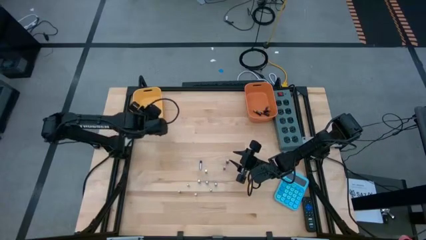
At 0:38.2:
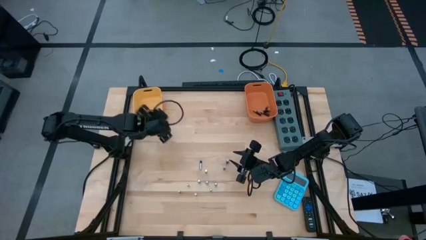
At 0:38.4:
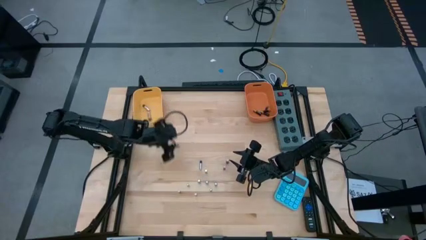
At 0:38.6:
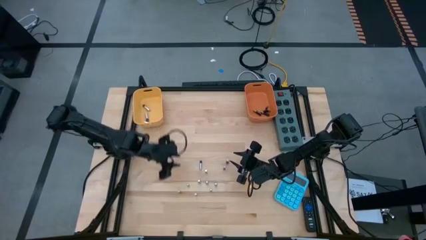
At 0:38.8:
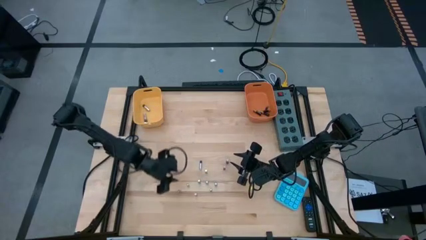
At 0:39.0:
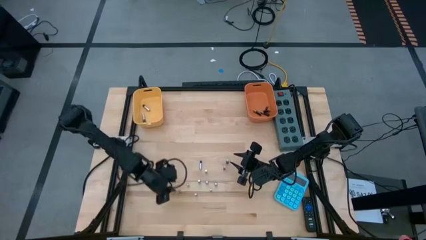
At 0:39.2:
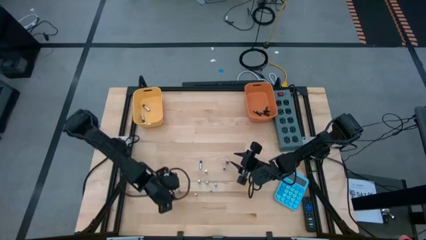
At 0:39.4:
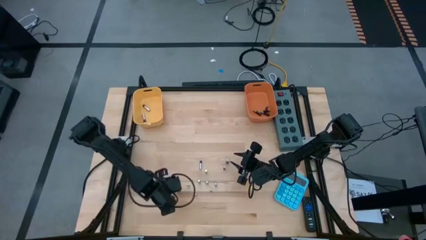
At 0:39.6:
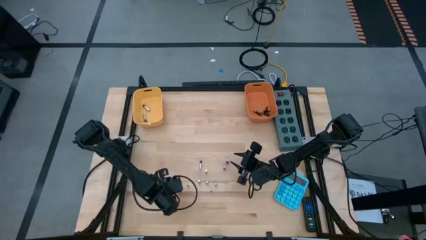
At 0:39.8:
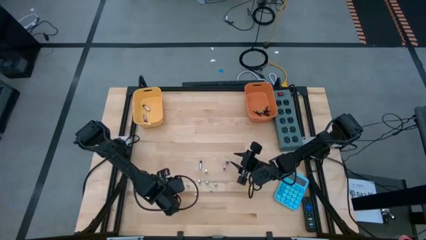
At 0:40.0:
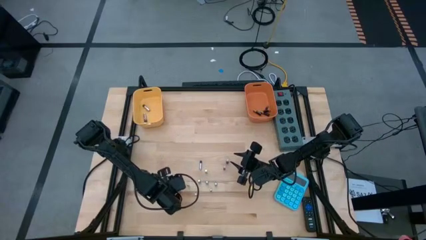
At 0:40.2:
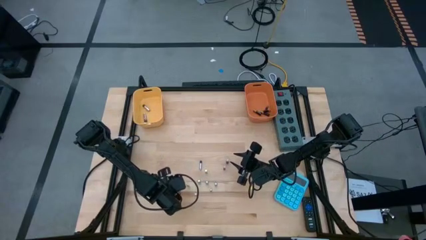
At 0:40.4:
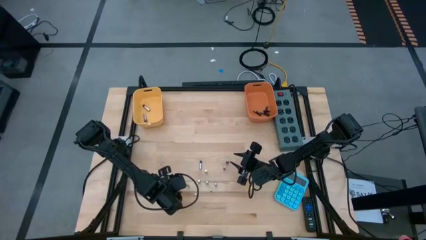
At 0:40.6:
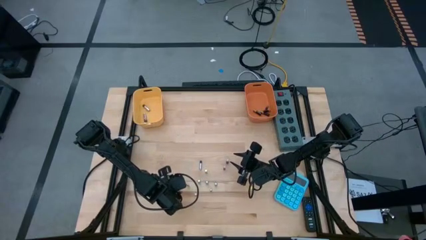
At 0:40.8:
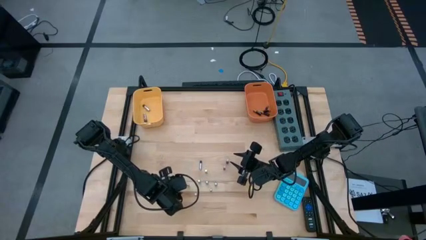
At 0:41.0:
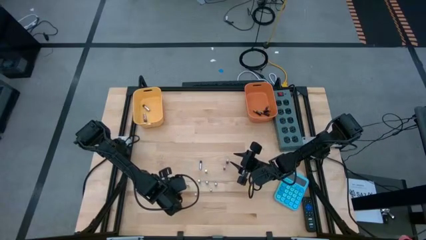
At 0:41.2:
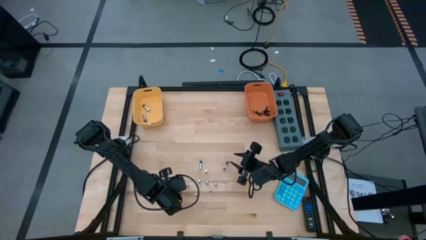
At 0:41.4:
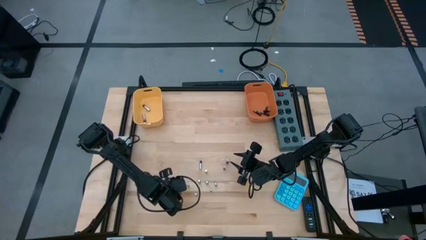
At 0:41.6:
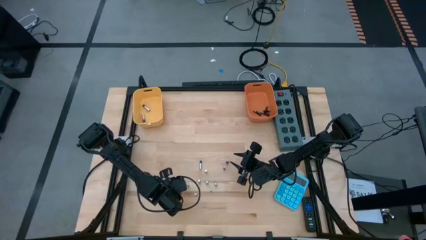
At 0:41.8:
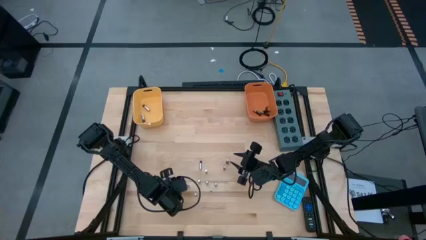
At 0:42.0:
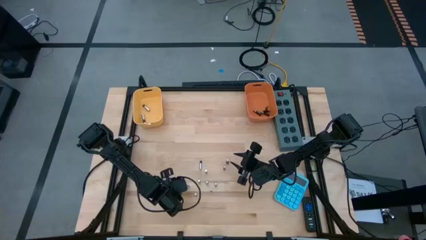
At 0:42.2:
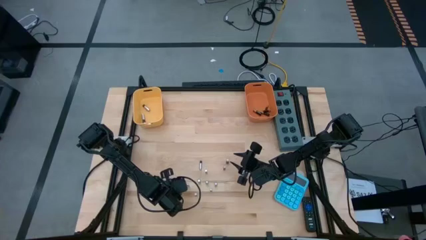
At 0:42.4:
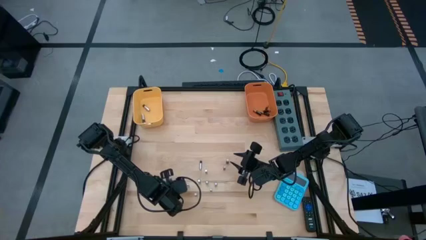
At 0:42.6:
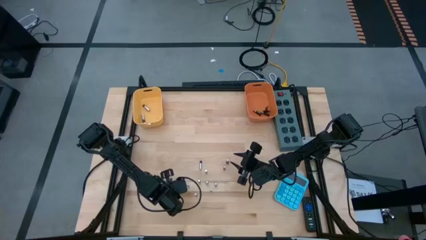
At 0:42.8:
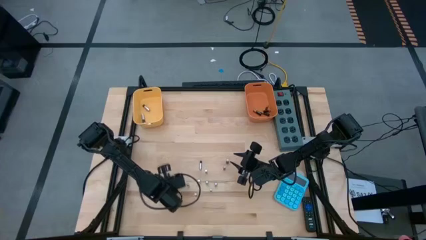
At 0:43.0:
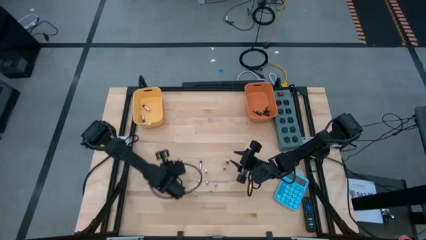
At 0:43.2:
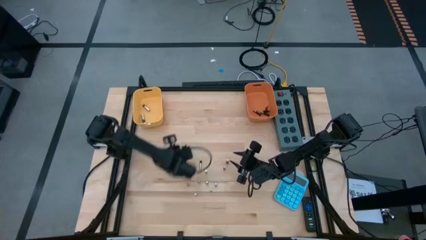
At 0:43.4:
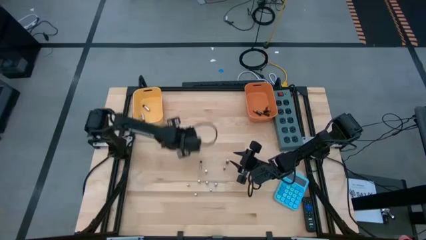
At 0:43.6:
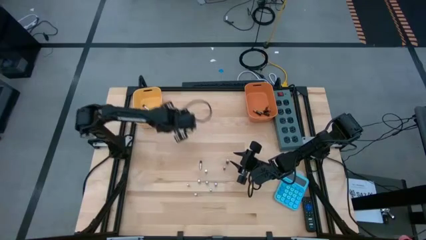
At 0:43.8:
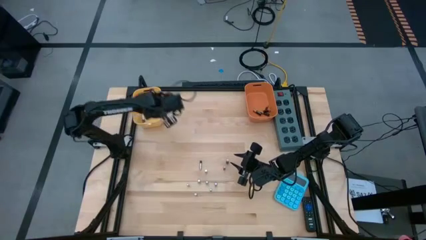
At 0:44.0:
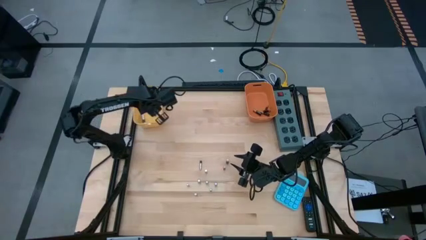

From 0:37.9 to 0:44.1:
Task: Sort batteries
Put the silver battery into the yellow bin

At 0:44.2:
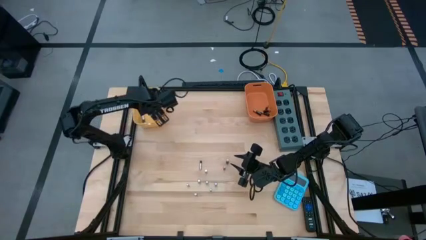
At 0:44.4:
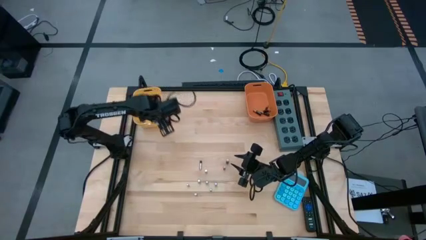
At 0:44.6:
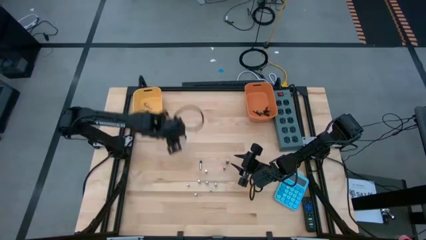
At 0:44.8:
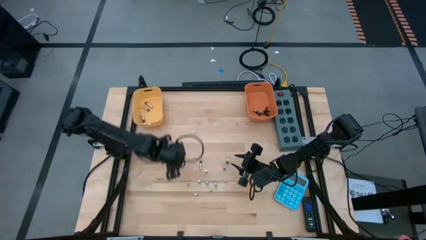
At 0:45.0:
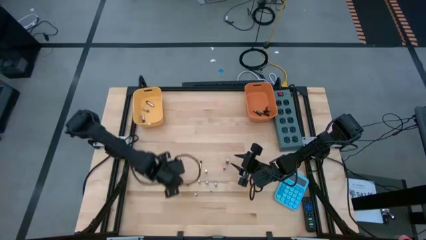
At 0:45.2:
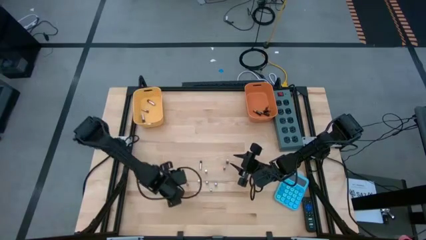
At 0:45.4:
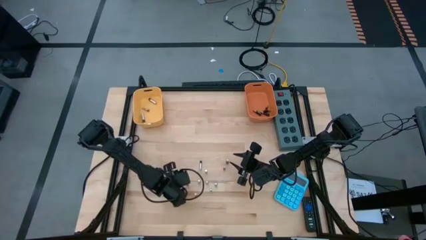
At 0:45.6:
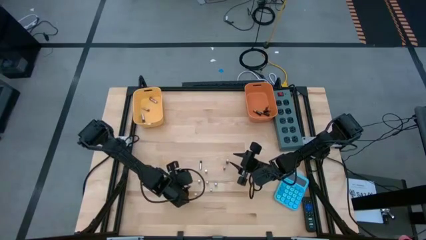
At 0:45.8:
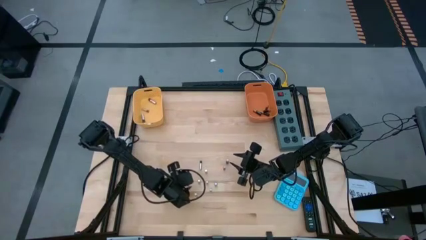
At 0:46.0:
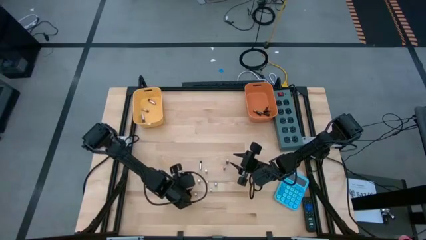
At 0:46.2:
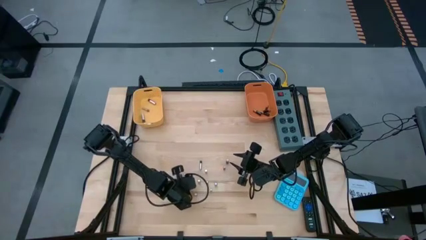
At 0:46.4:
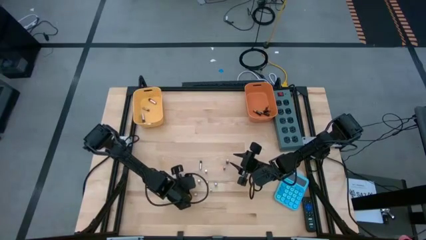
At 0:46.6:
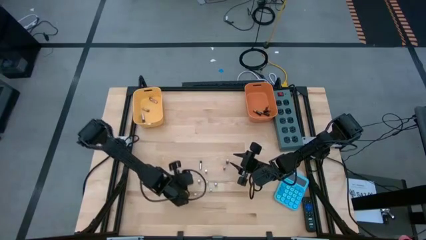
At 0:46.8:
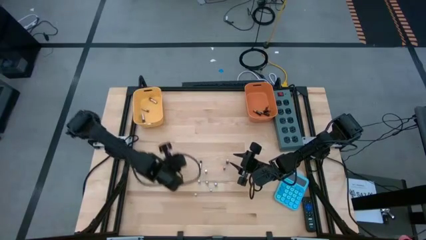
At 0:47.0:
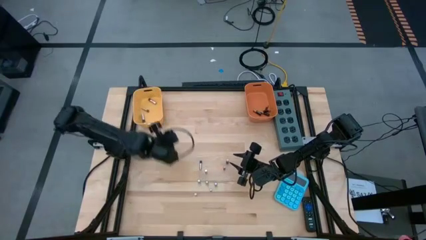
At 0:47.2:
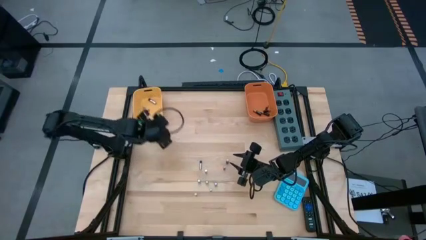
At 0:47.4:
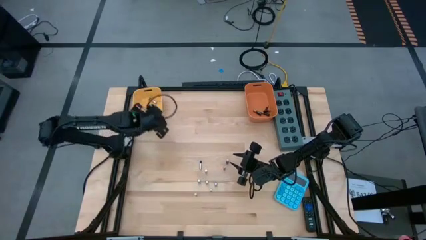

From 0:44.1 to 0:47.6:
Put the silver battery into the yellow bin

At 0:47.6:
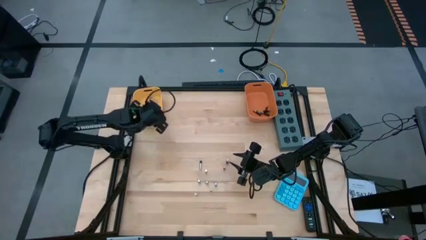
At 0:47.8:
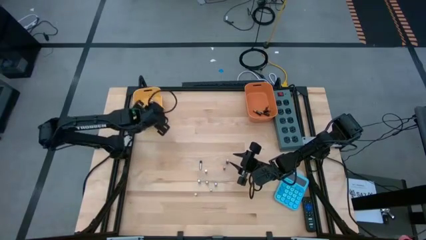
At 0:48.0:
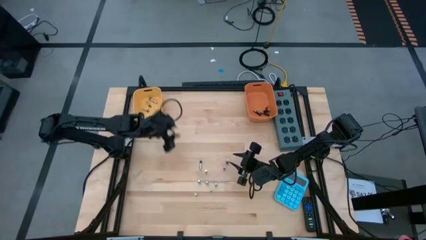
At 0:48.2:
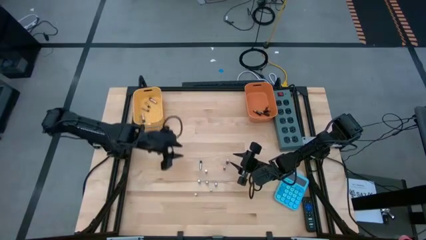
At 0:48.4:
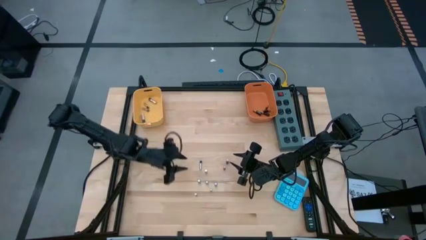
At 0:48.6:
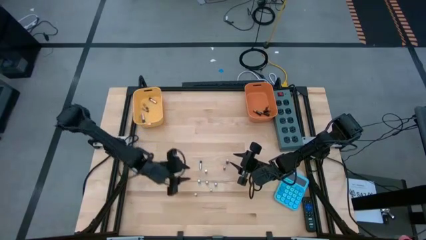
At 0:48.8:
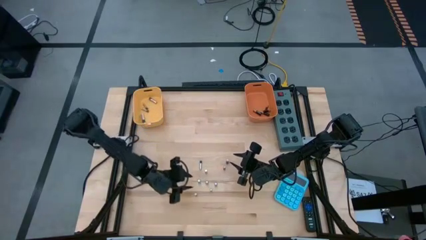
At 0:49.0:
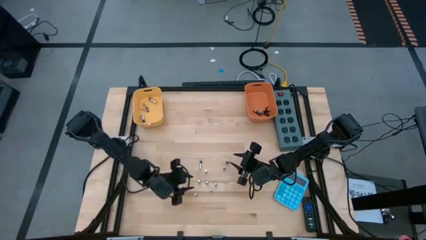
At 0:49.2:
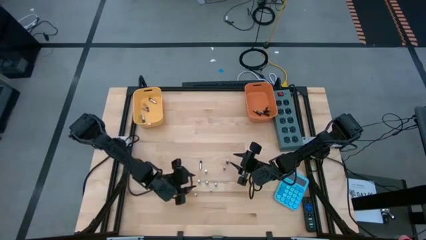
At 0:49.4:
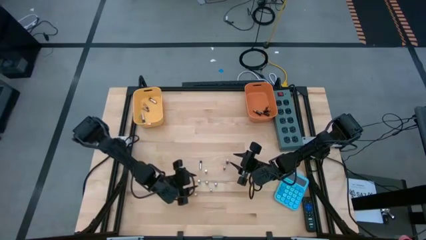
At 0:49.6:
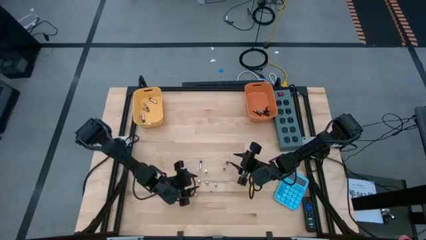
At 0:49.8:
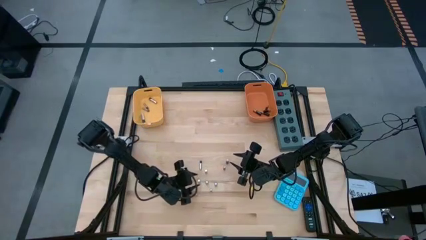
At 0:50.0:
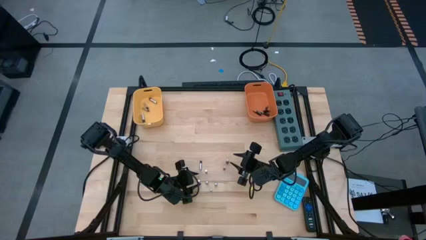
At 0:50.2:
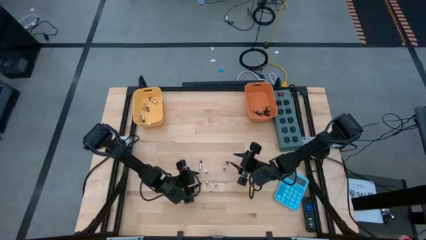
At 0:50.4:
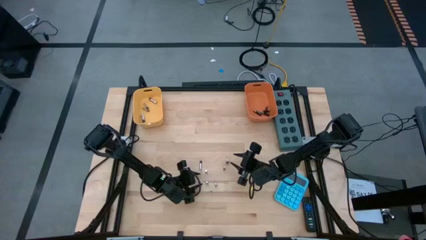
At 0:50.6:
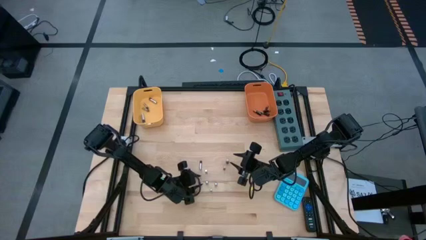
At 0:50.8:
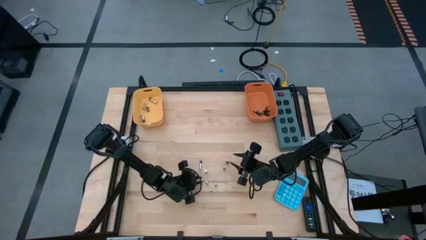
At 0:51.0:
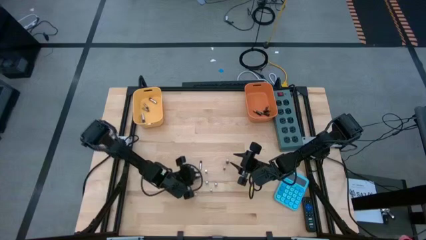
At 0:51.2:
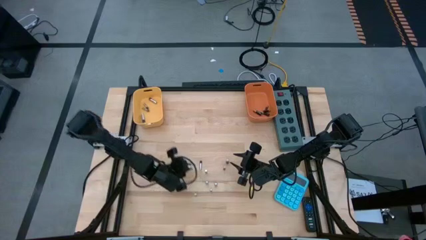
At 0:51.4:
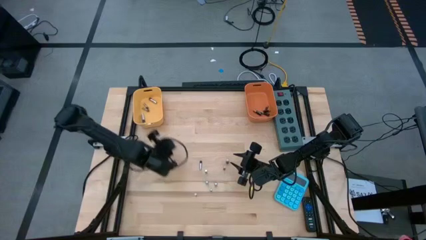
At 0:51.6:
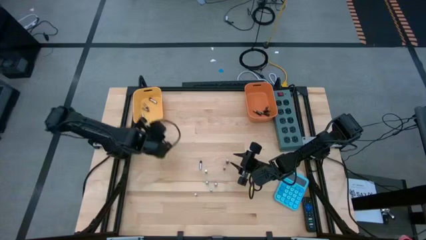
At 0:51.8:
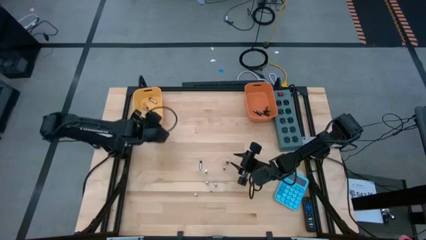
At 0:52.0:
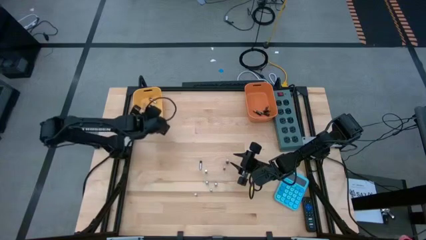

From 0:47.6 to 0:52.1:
Put the silver battery into the yellow bin

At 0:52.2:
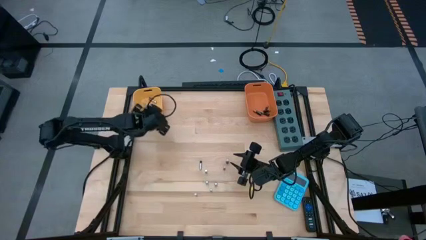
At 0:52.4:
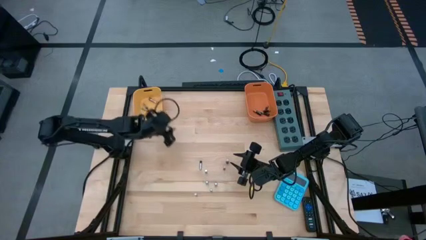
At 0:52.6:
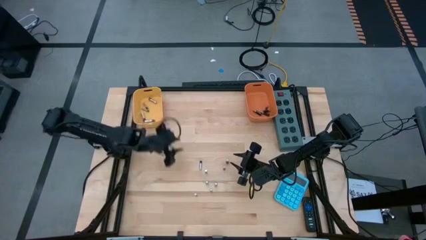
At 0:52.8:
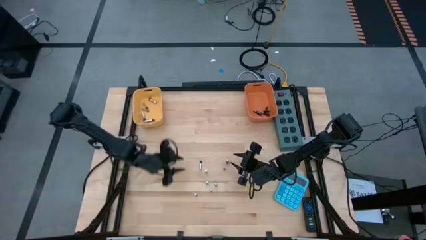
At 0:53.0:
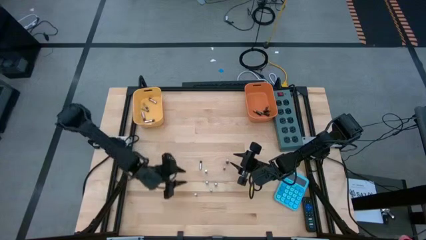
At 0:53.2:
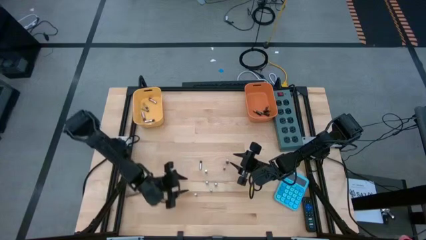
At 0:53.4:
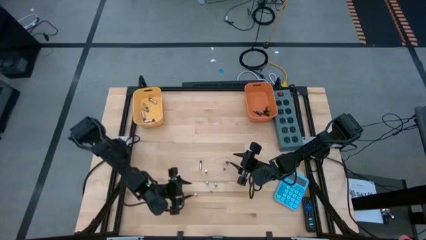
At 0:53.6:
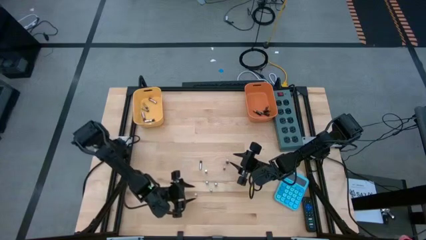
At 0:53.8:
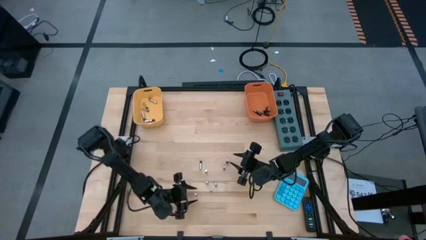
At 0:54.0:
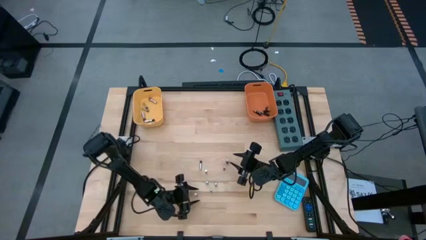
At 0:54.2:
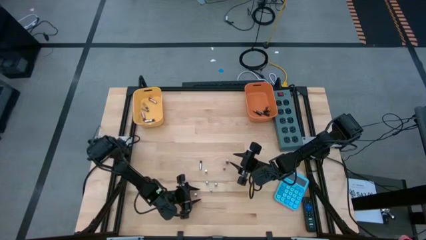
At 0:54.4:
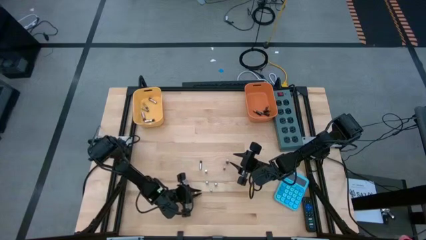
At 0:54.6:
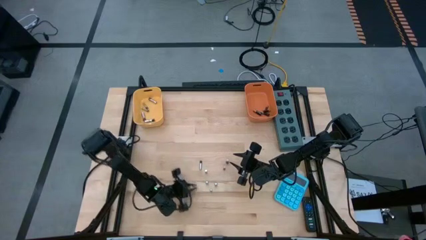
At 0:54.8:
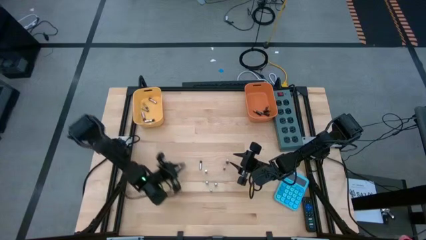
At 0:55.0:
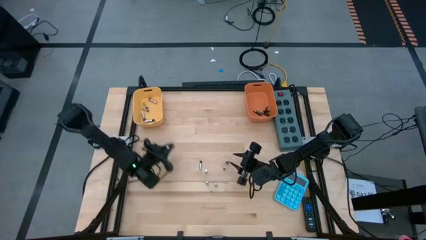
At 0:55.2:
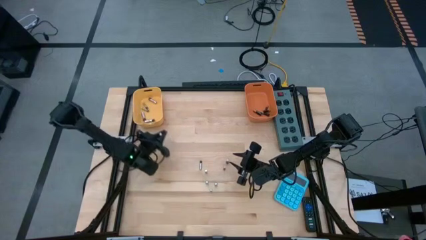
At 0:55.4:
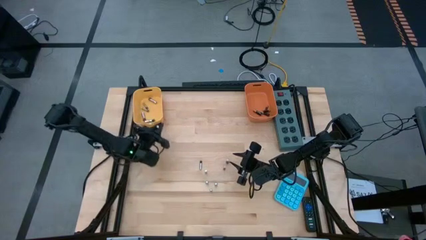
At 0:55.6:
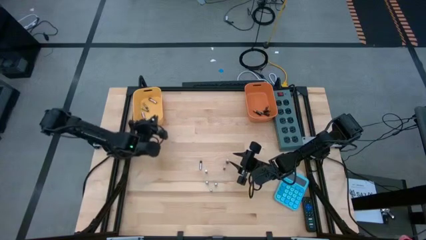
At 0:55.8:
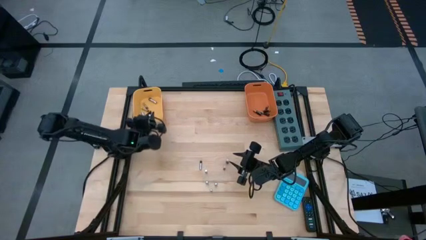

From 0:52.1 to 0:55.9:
Put the silver battery into the yellow bin
